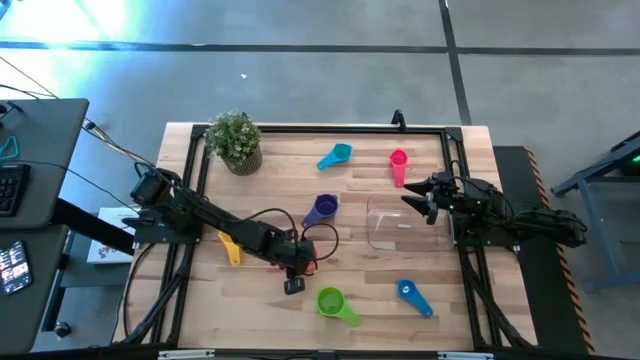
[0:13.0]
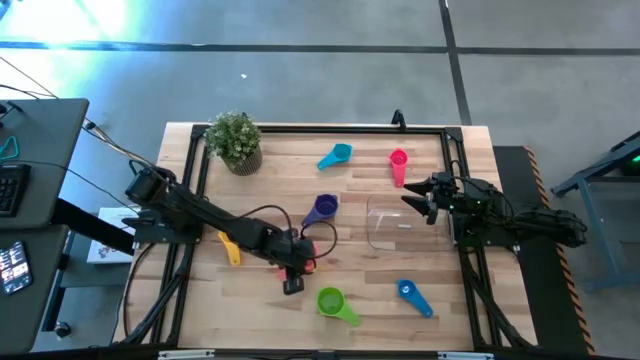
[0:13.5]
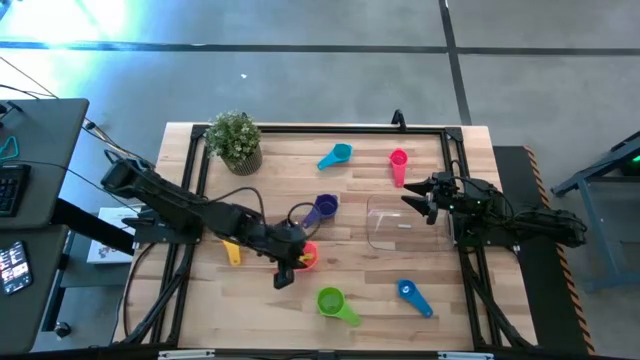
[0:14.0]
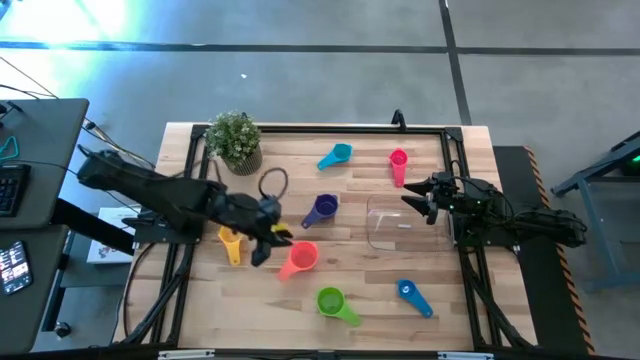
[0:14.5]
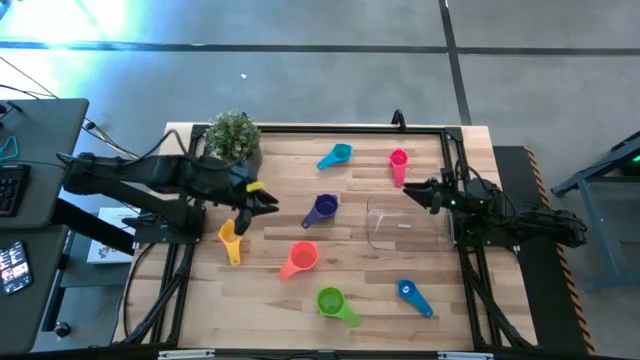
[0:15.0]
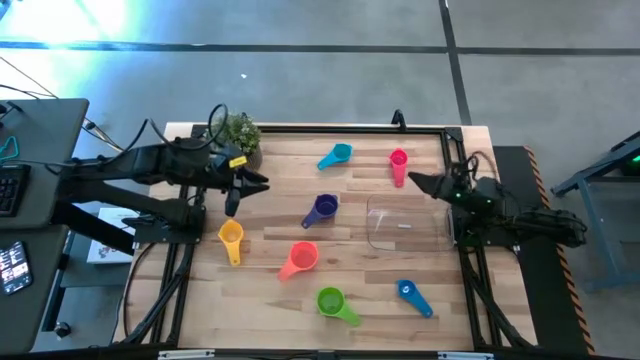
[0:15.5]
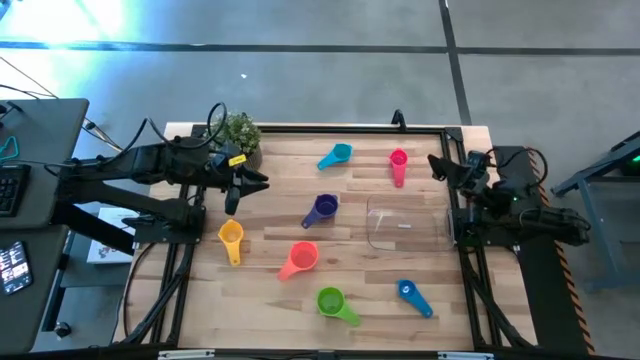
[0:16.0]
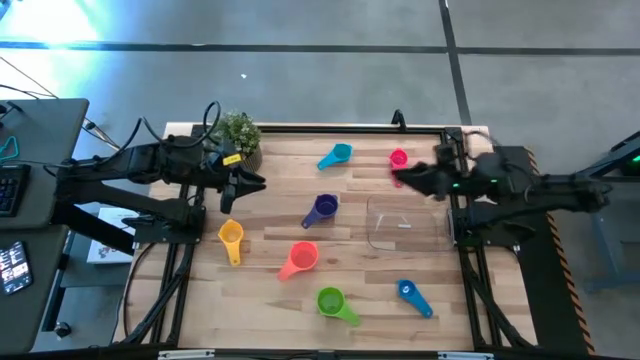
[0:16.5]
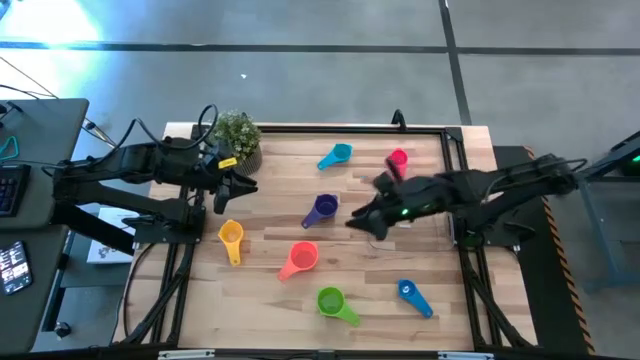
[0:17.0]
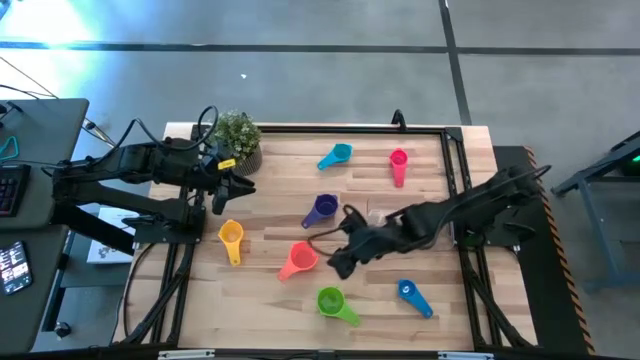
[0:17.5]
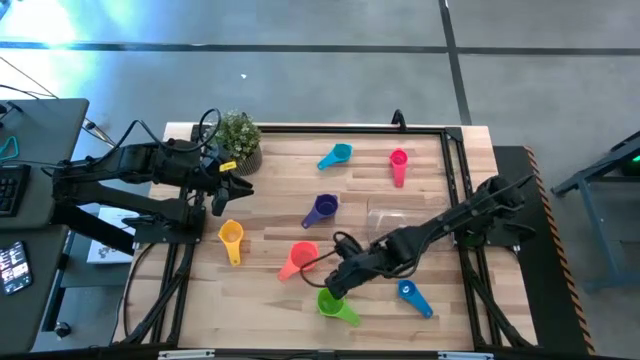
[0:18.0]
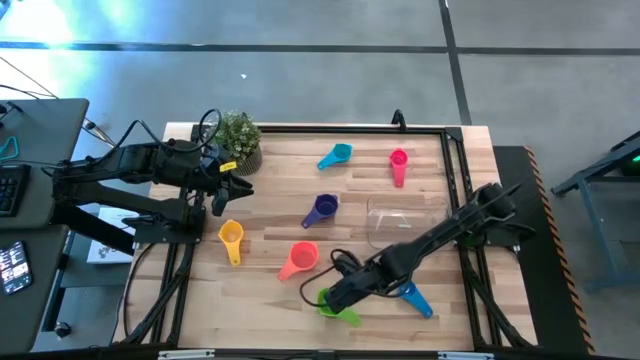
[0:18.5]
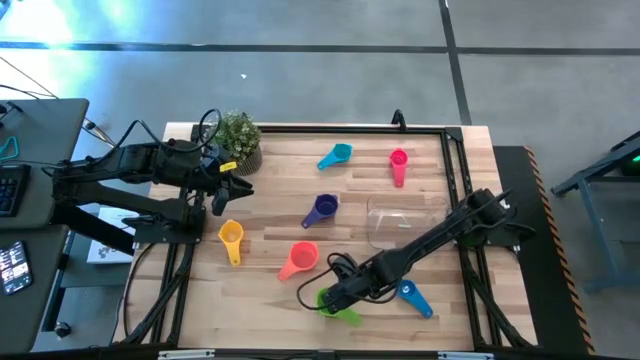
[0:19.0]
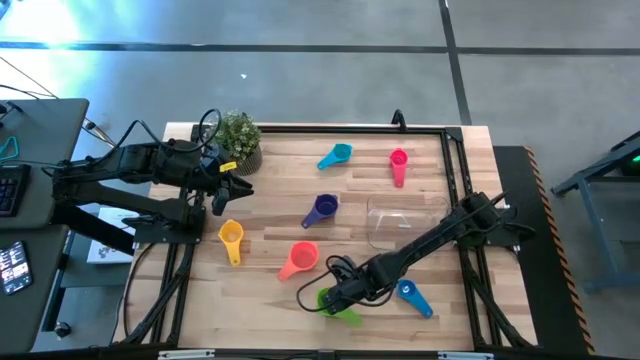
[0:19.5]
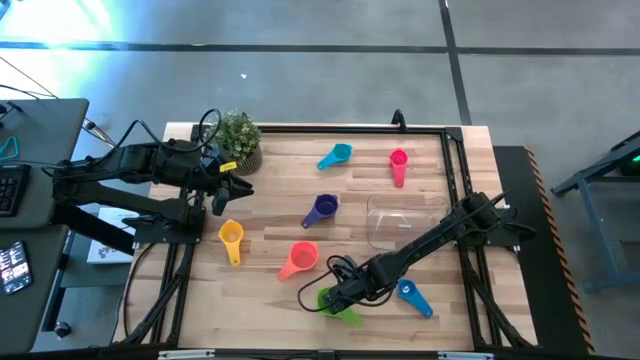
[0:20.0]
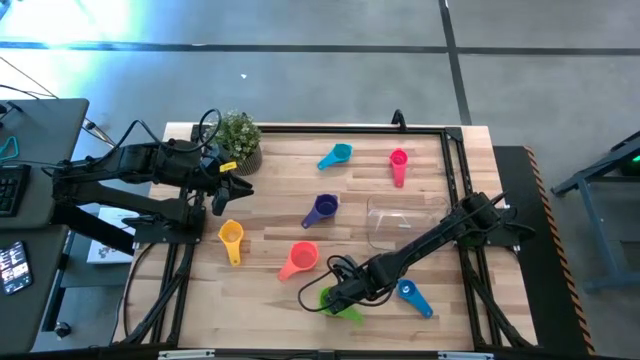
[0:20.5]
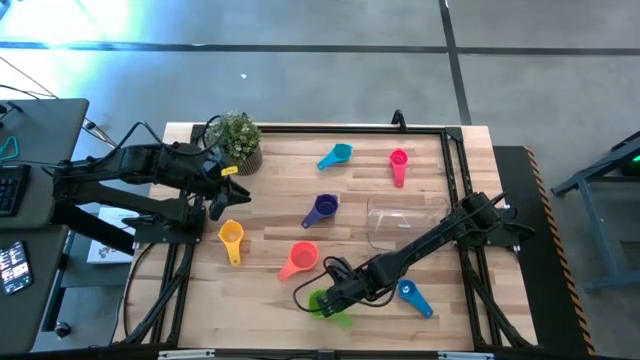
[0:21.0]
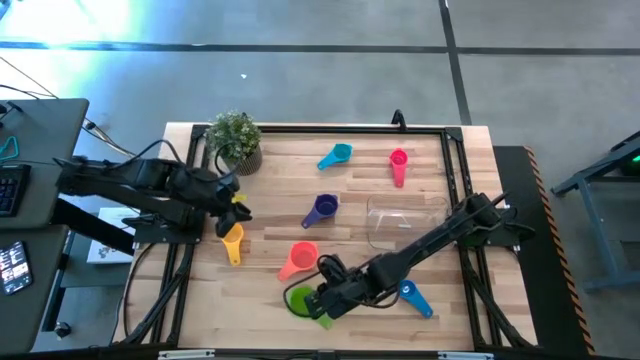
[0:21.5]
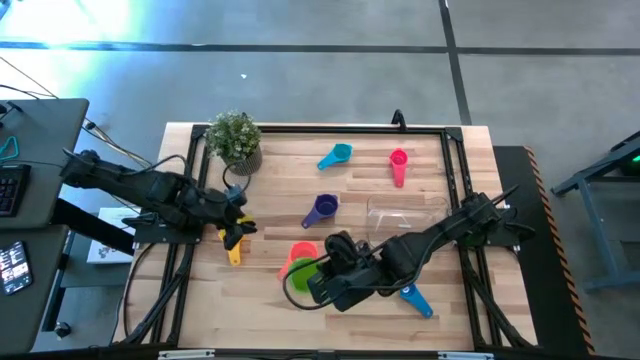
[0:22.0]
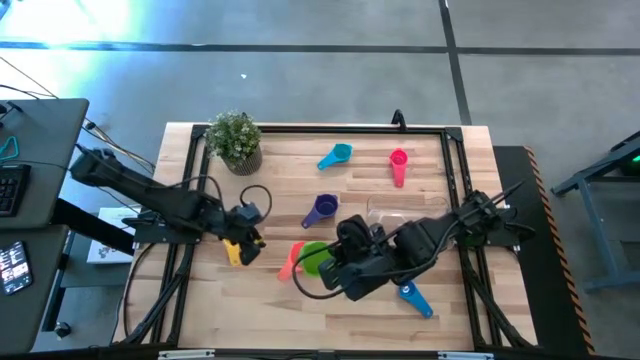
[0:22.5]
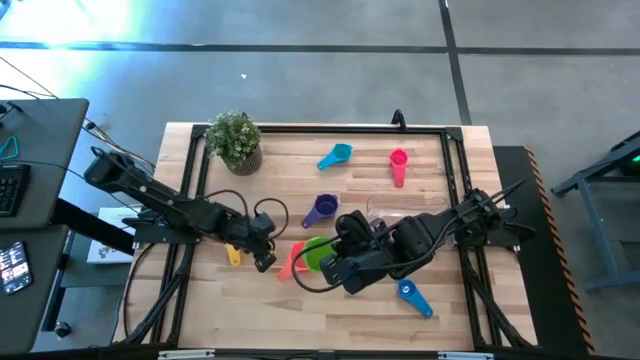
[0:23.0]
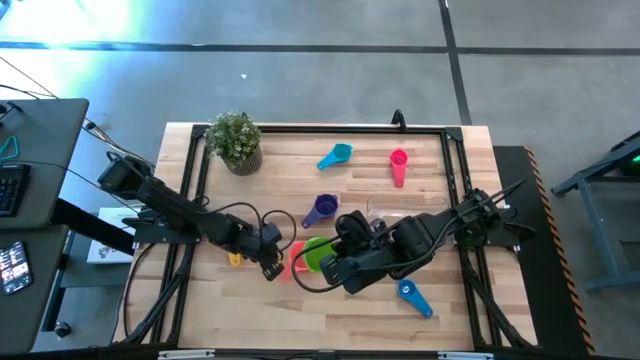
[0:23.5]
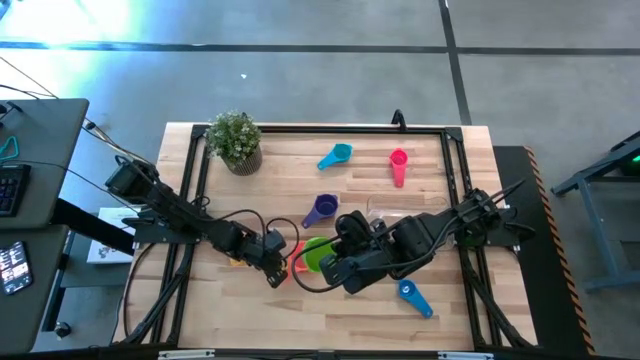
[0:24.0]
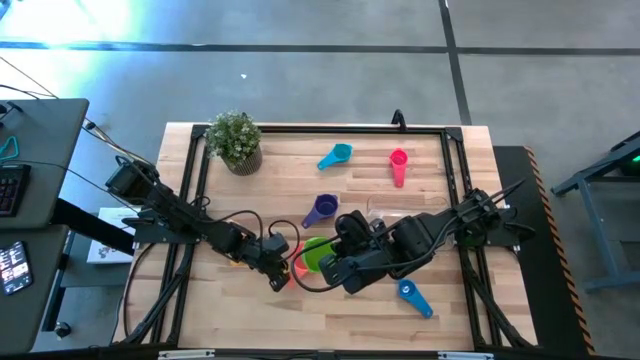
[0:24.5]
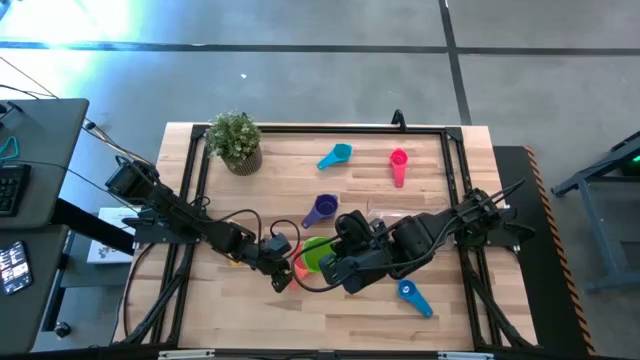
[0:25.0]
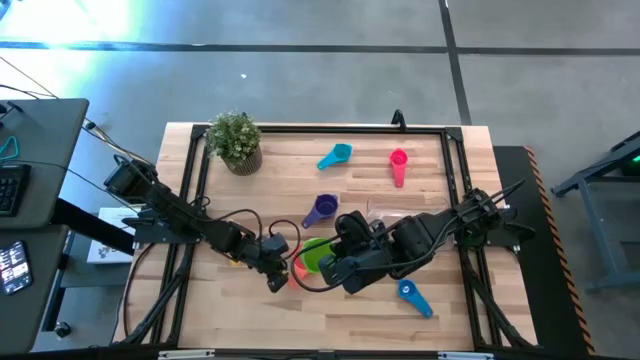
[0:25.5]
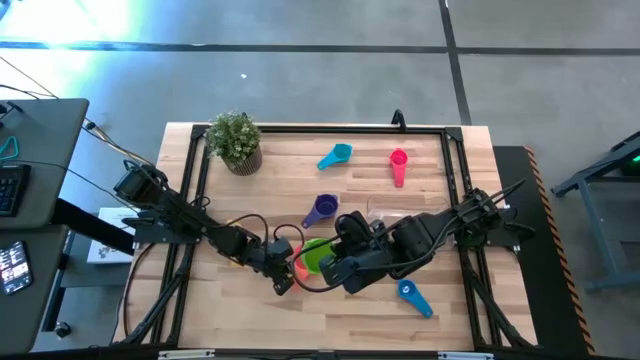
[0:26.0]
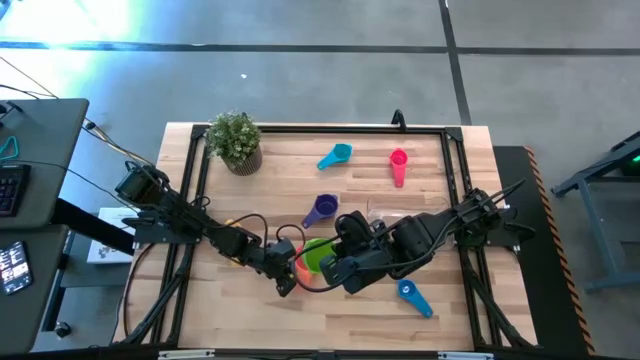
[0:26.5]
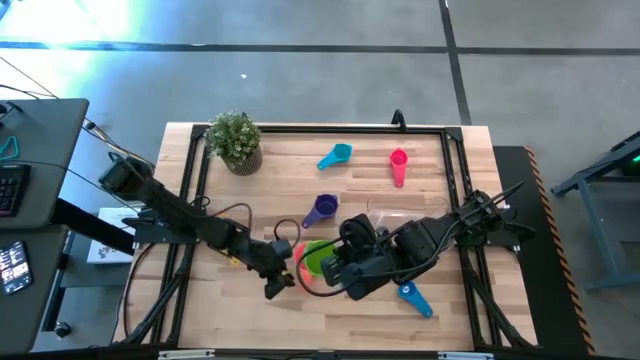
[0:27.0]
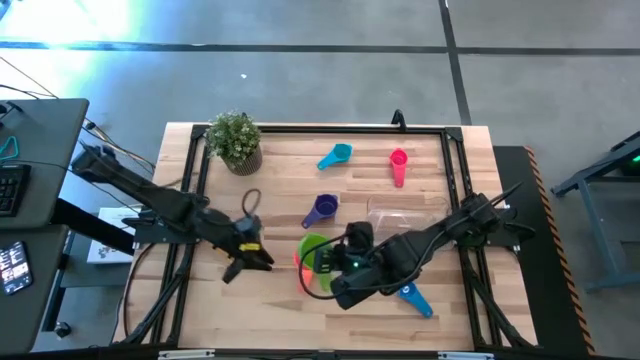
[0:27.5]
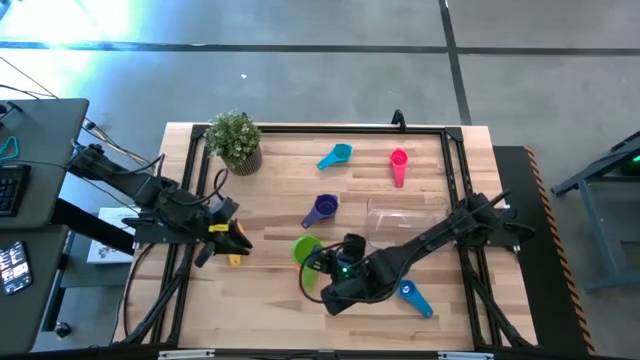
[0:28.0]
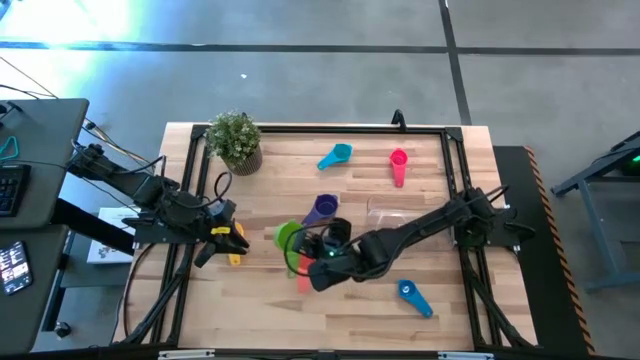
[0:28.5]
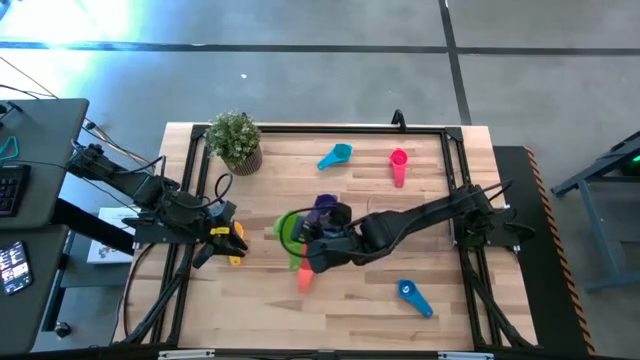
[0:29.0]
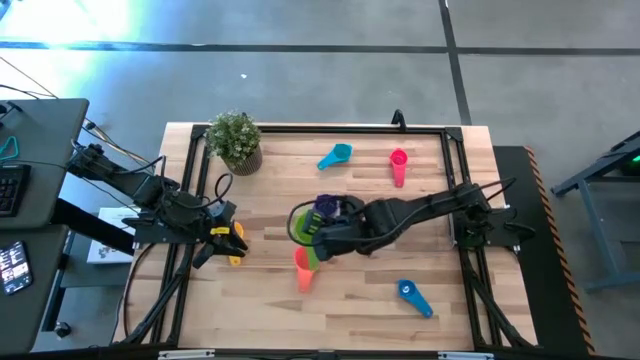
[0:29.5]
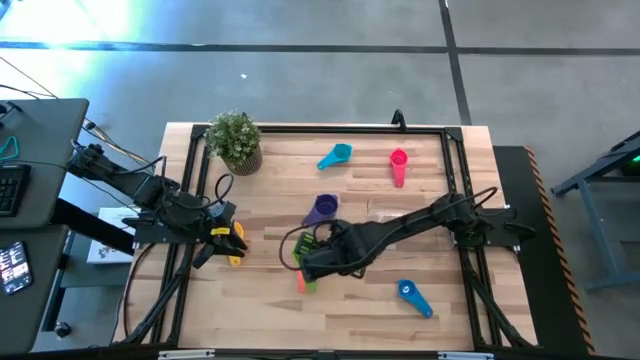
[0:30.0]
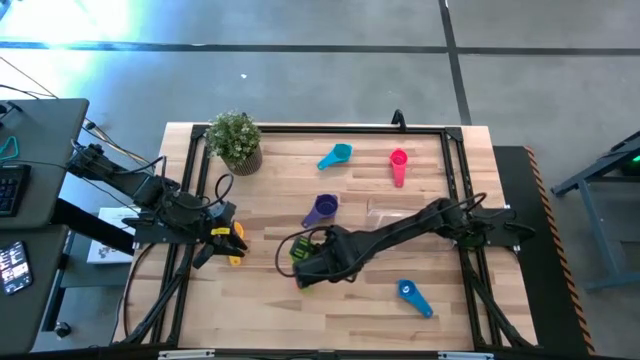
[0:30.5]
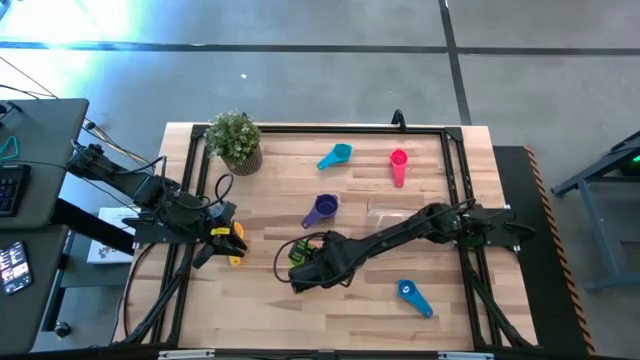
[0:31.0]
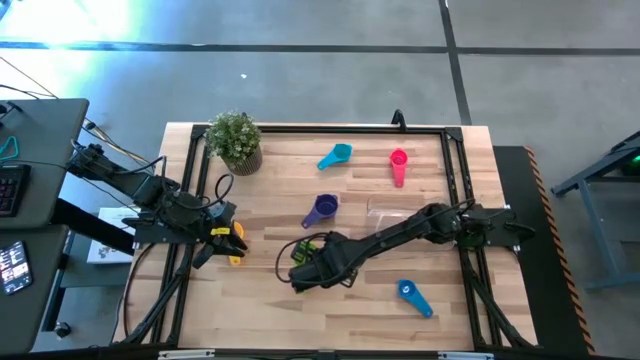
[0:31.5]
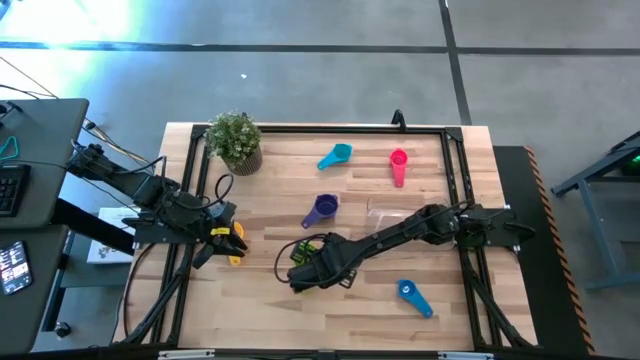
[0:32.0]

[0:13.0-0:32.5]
Task: Nest measuring cups in basket
Stack the green measuring cup on top of the orange measuring cup
